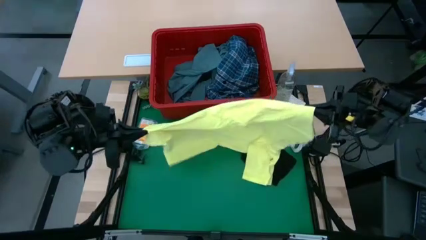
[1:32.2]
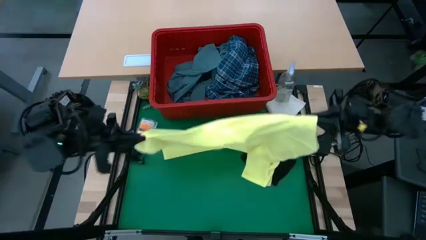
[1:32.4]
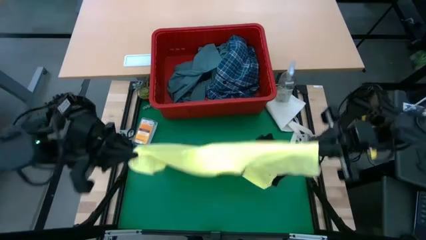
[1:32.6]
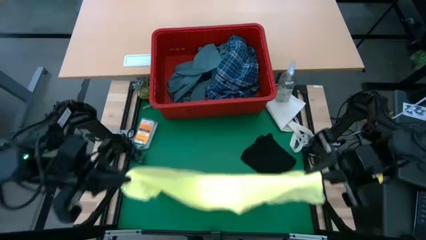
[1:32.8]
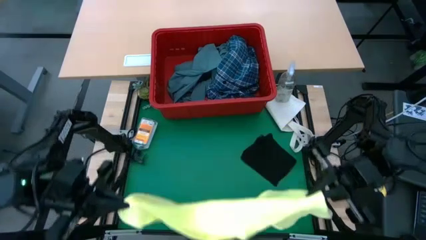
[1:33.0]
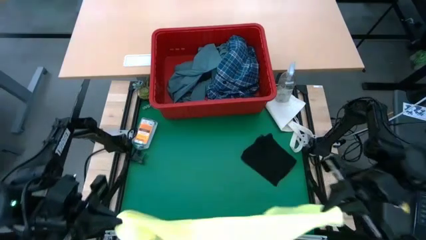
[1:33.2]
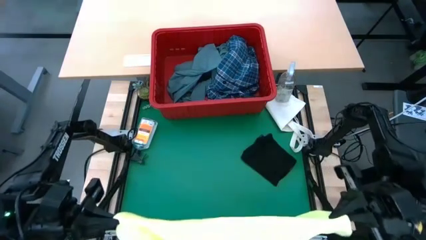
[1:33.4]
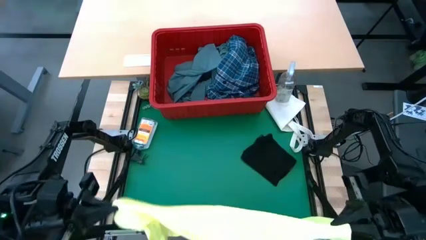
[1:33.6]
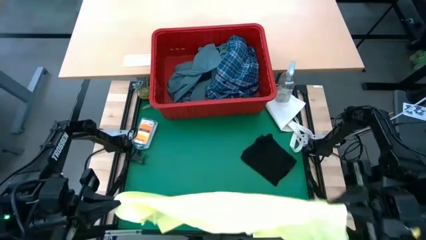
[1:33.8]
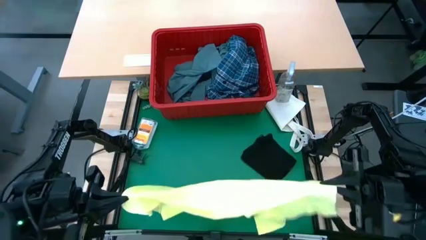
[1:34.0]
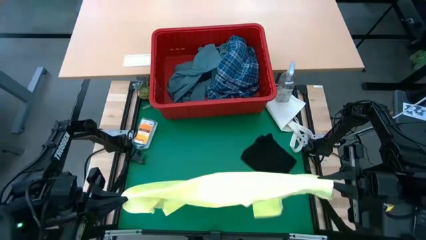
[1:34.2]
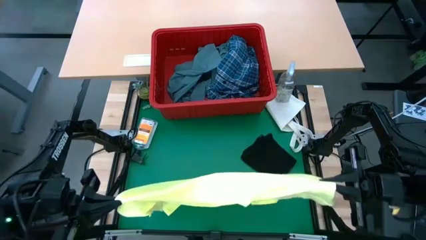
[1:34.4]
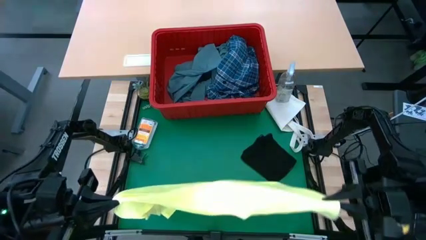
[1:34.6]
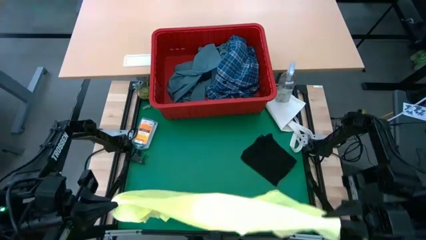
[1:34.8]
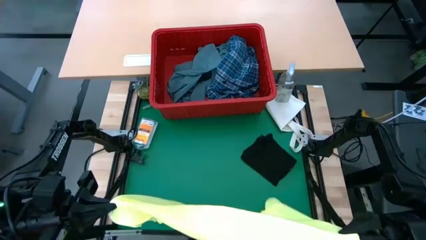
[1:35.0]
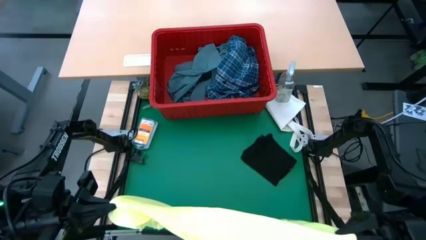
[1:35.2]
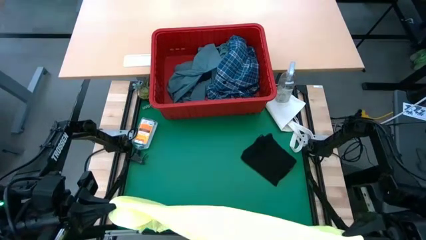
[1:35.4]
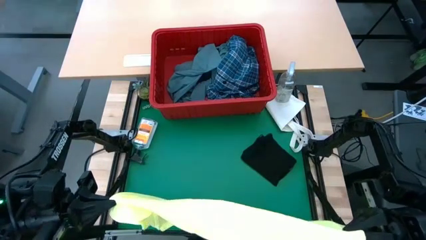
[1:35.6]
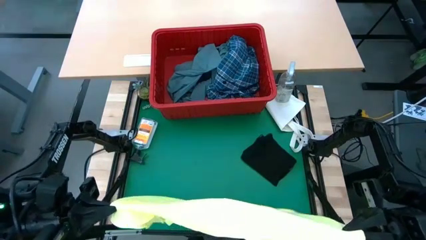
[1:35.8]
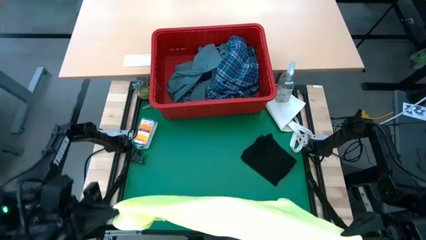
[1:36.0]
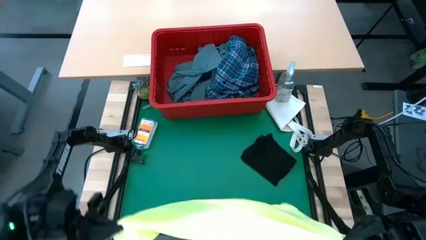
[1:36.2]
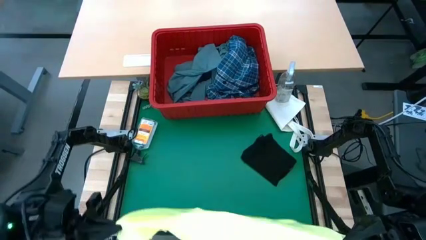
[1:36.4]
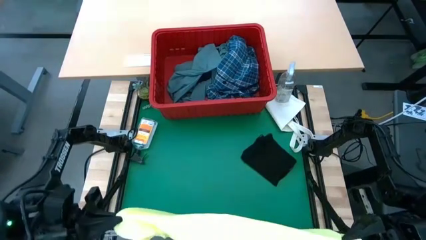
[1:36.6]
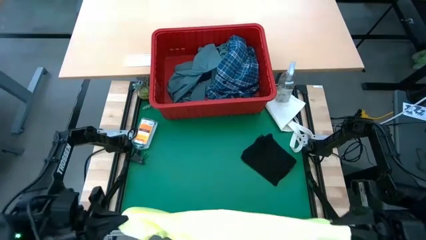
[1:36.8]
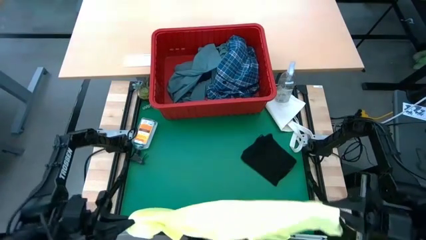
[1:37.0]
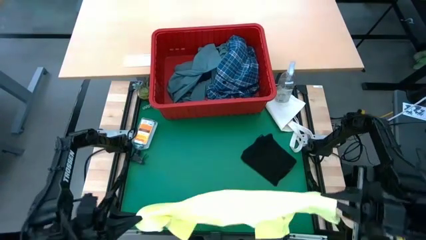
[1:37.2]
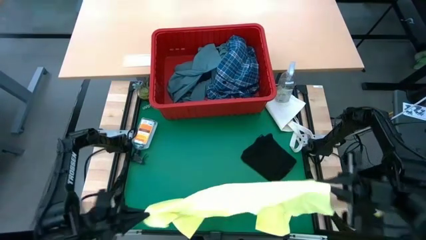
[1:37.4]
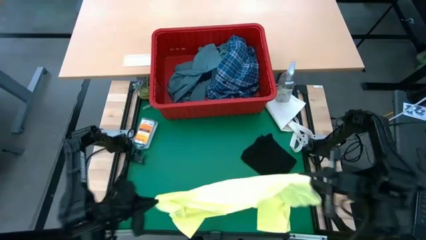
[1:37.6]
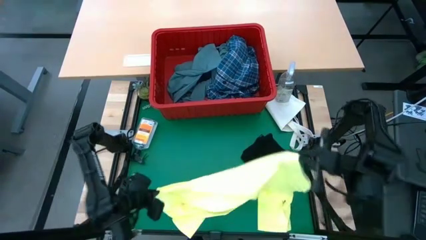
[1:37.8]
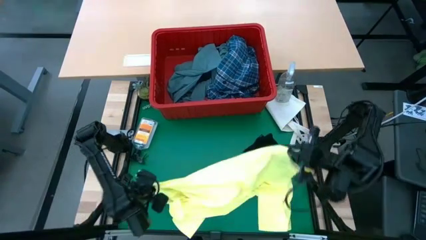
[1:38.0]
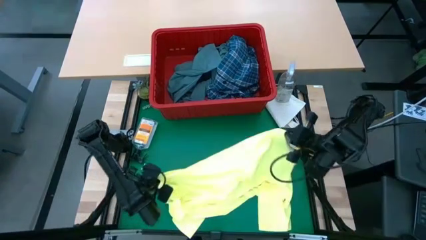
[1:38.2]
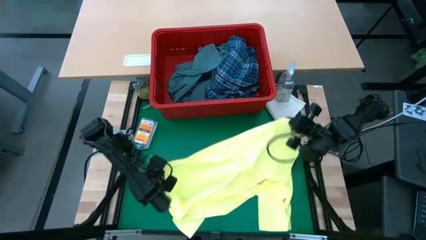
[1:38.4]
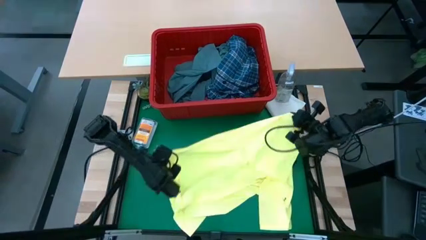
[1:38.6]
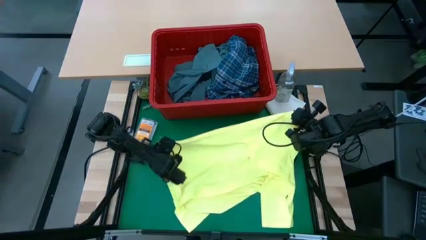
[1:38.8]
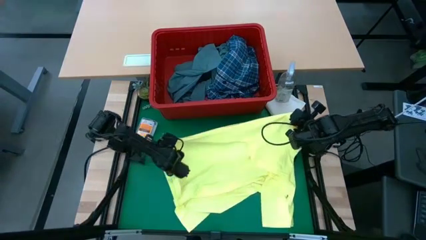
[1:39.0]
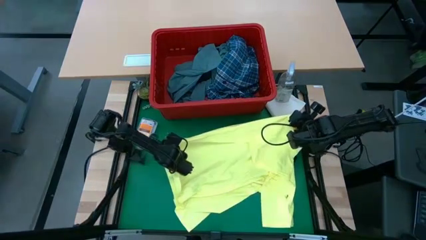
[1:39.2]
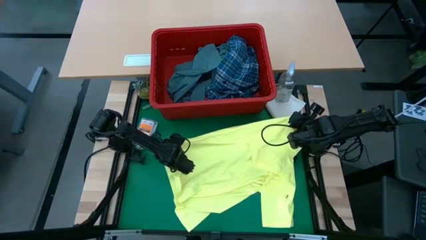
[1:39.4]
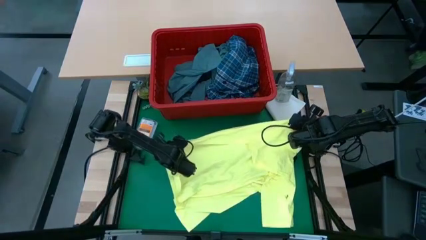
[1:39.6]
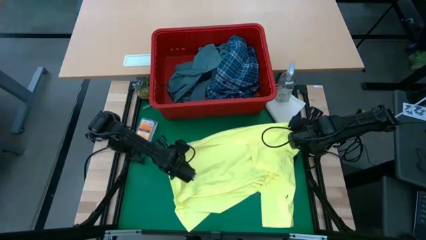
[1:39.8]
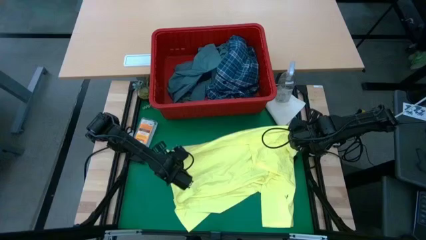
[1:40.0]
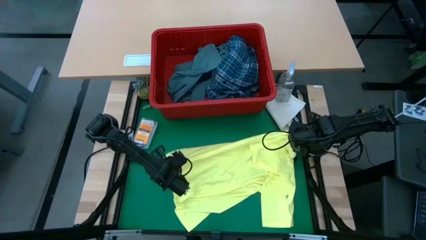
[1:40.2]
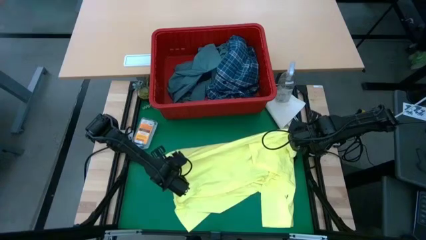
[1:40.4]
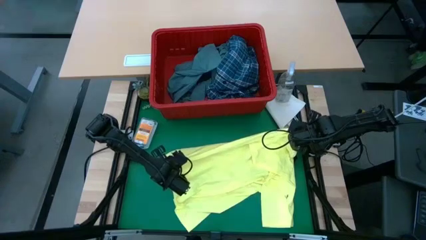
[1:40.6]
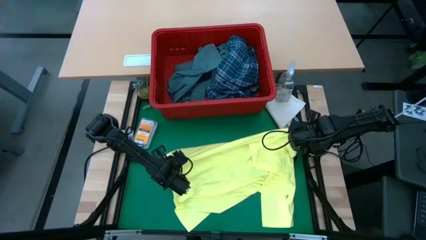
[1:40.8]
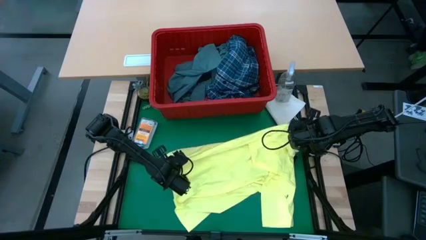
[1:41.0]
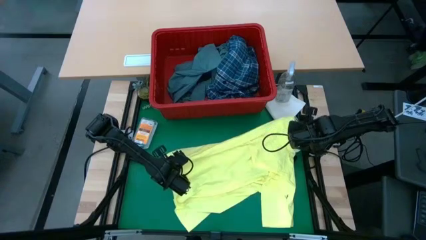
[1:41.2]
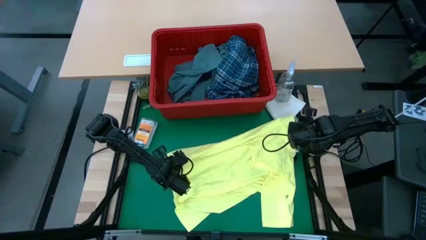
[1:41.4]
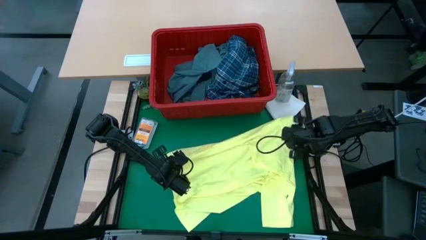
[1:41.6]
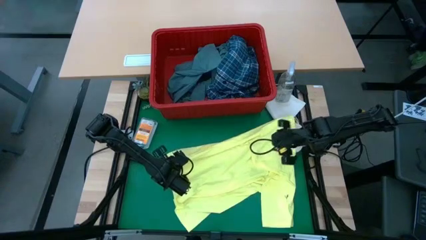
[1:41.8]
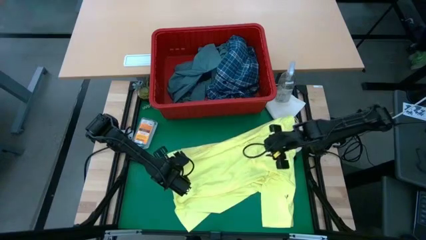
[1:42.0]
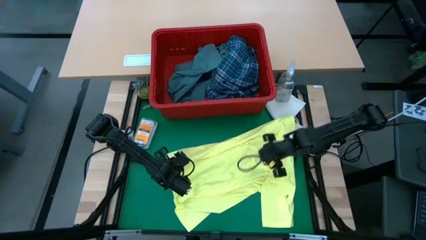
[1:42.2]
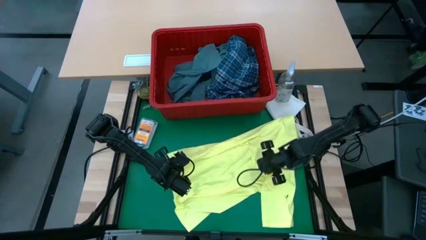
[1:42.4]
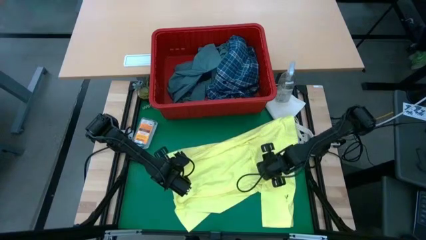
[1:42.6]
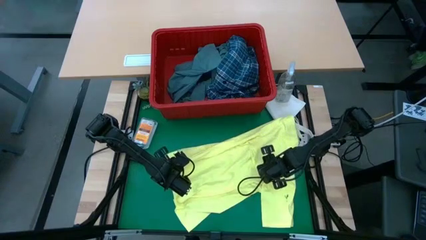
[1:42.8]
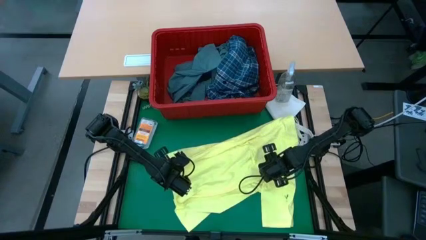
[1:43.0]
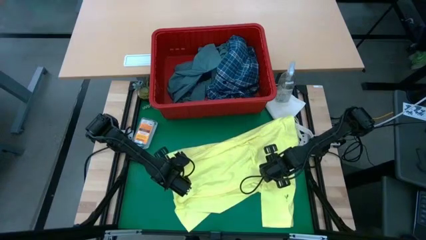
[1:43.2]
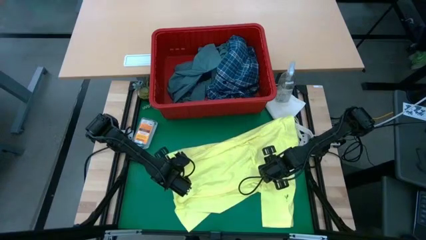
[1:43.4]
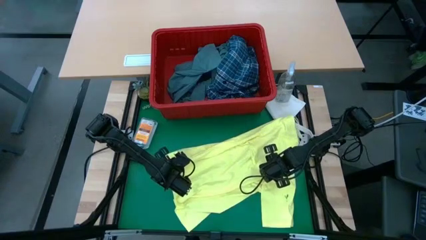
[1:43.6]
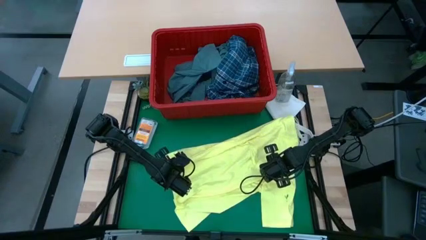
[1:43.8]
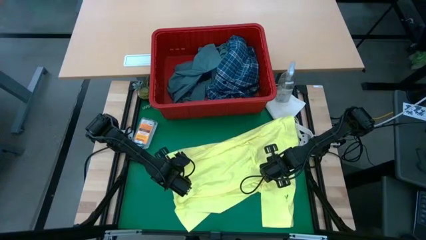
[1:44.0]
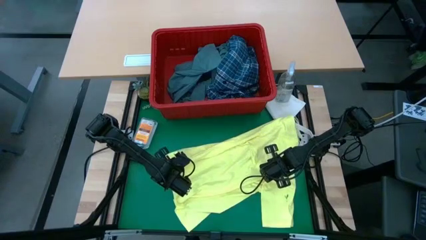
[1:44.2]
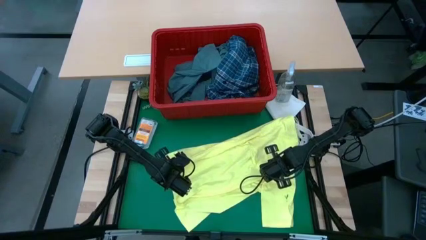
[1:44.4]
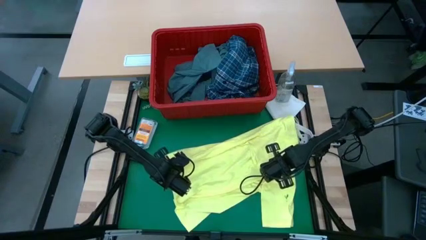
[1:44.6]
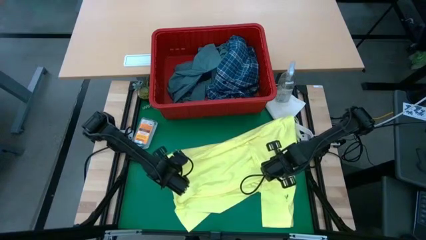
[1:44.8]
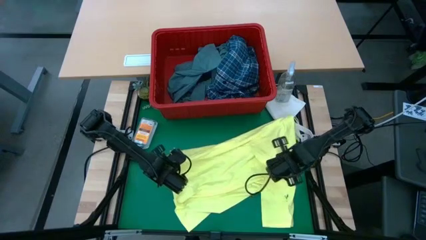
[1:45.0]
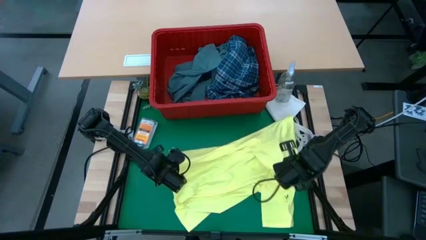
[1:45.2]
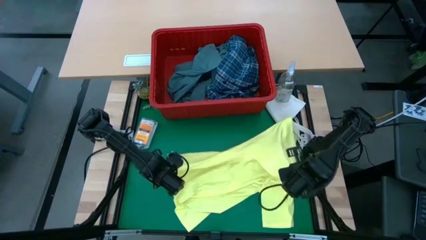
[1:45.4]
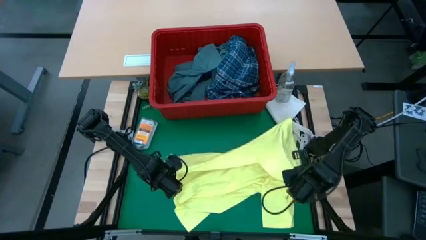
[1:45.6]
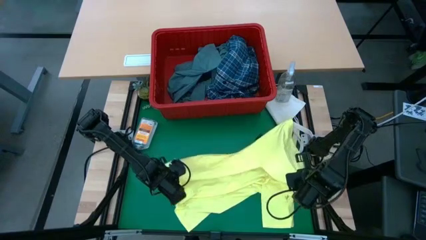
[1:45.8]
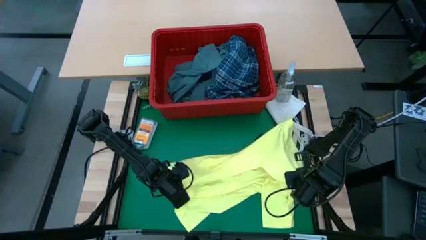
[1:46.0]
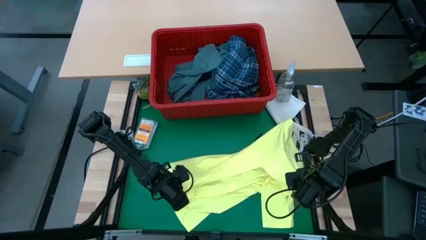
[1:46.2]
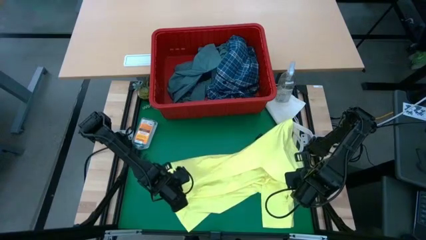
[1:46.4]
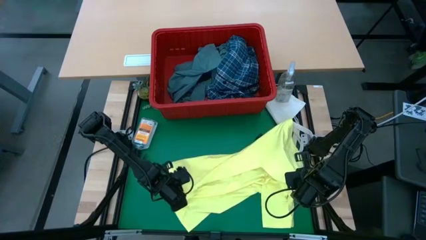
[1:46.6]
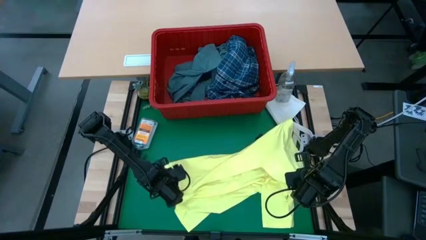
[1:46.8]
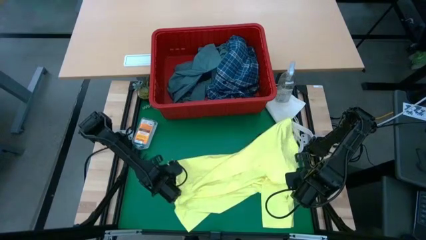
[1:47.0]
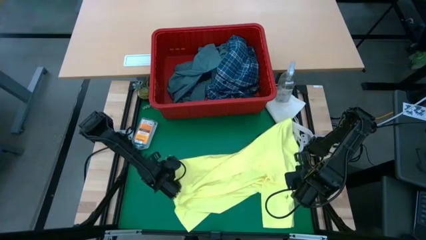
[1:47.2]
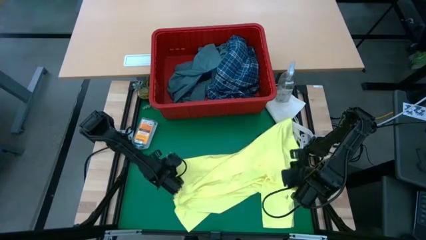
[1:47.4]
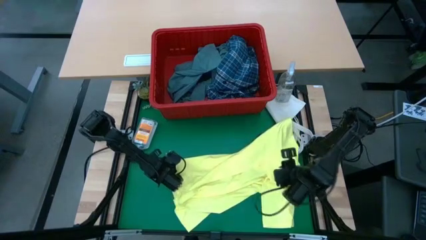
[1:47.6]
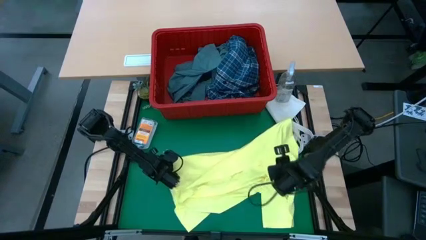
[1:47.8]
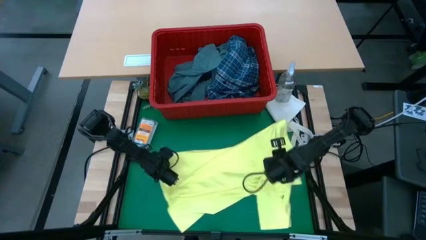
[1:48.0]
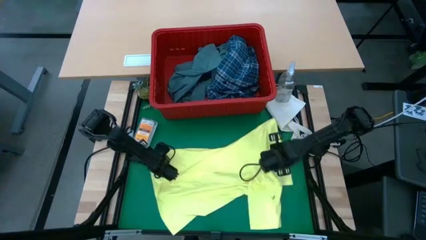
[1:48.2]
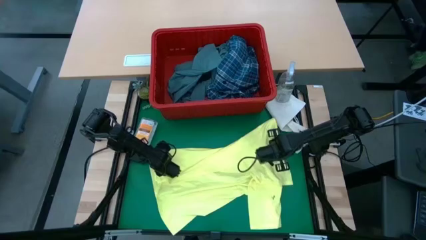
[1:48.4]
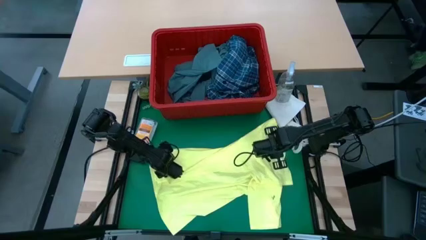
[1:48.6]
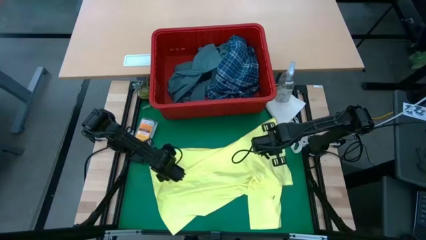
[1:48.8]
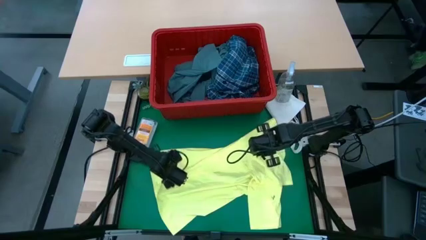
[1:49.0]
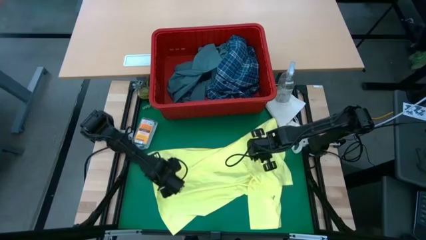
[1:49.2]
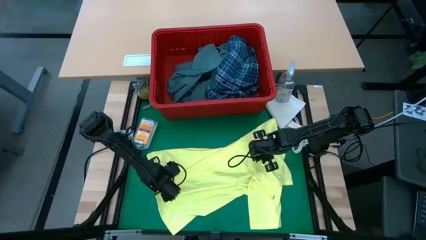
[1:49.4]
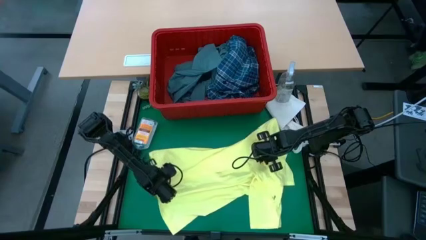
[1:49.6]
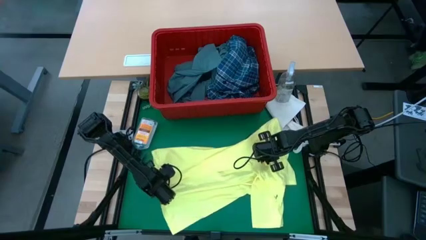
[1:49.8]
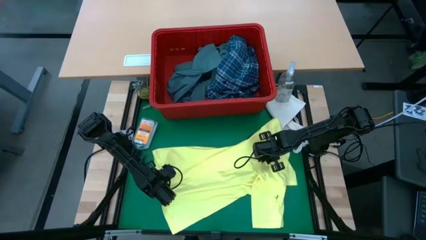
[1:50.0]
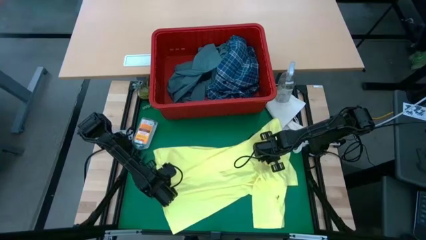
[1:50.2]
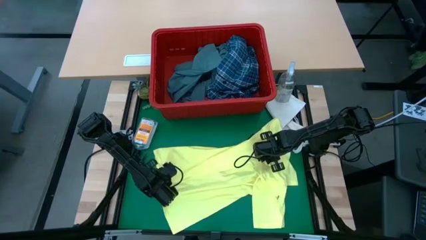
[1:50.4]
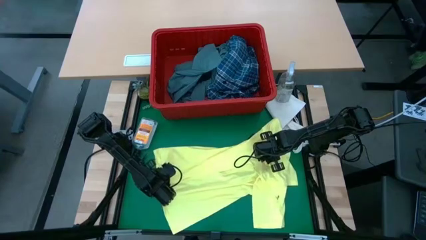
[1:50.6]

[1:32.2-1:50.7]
Task: Fold Laundry from Bin
Fold the yellow shirt
